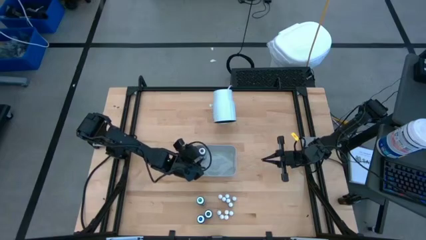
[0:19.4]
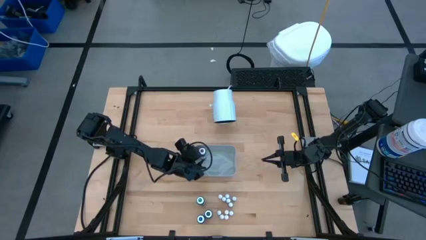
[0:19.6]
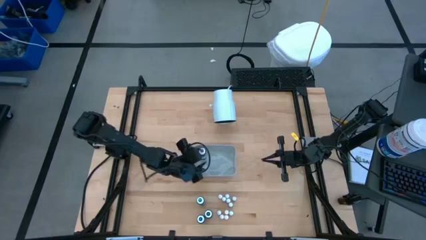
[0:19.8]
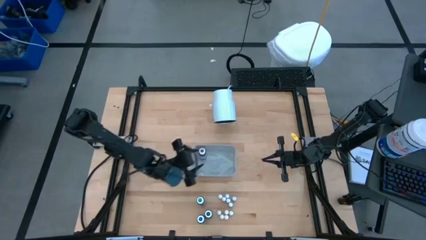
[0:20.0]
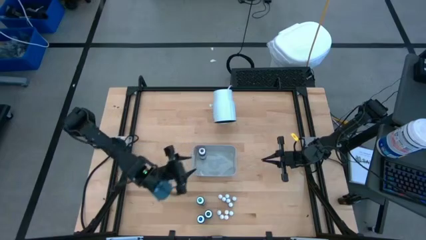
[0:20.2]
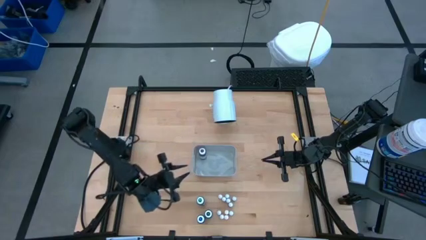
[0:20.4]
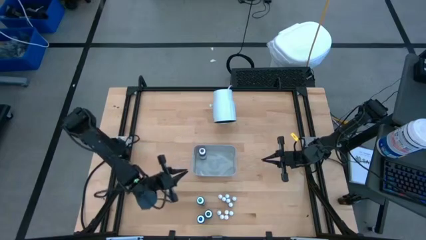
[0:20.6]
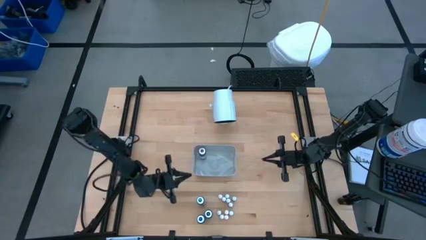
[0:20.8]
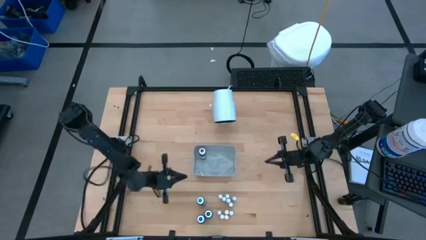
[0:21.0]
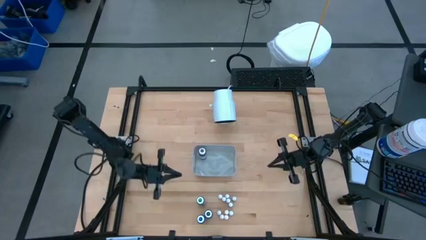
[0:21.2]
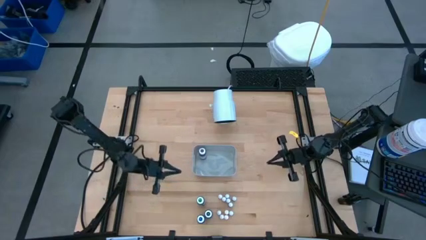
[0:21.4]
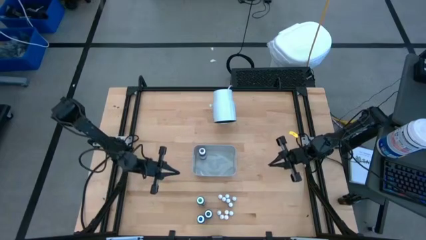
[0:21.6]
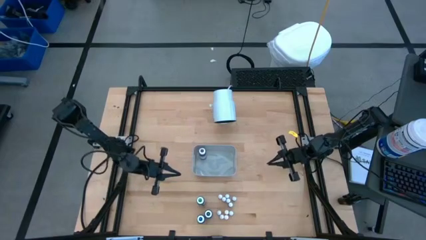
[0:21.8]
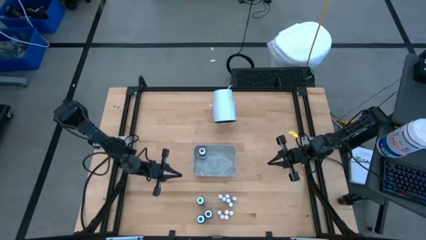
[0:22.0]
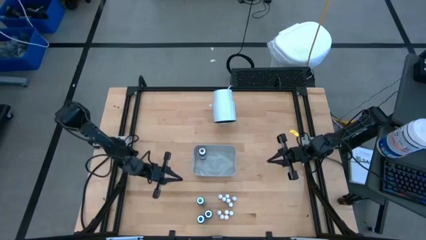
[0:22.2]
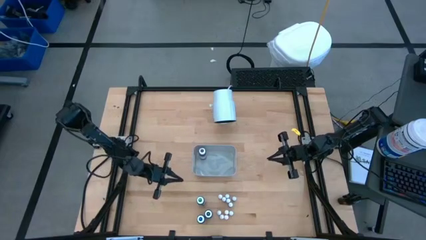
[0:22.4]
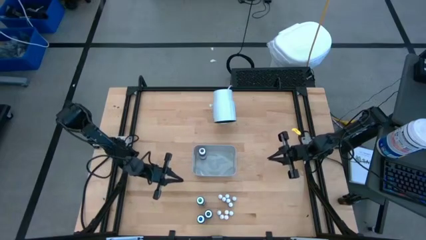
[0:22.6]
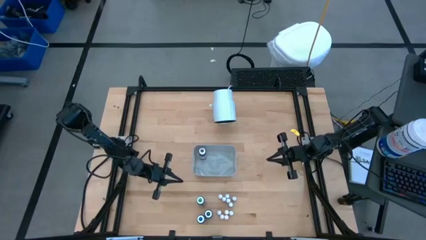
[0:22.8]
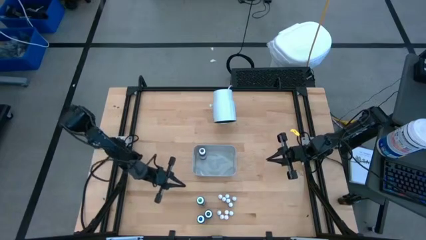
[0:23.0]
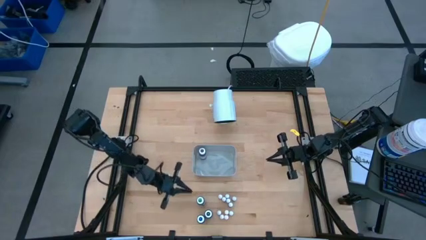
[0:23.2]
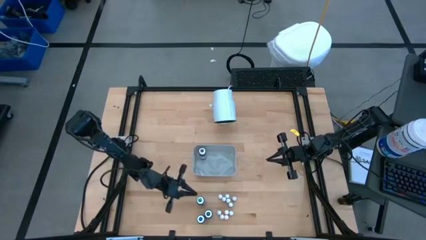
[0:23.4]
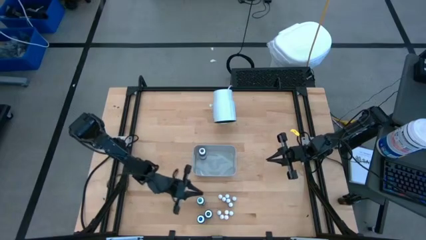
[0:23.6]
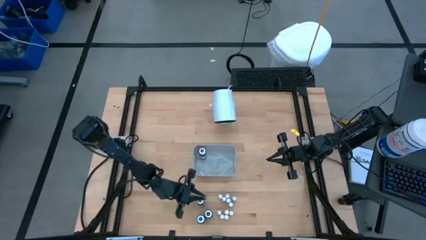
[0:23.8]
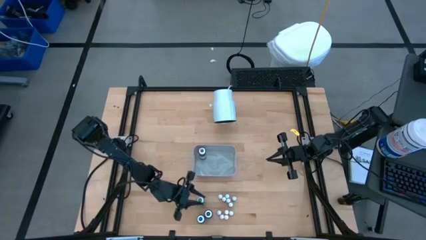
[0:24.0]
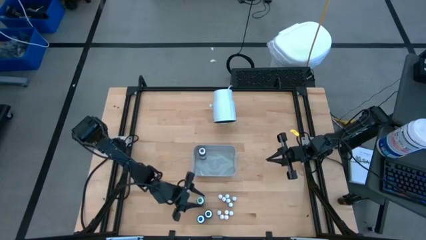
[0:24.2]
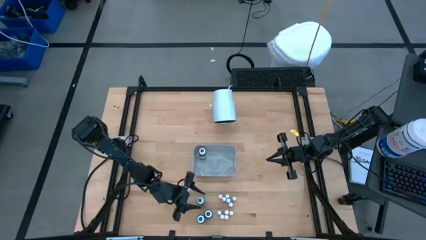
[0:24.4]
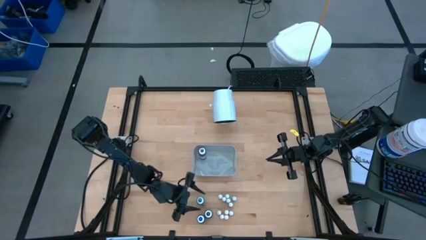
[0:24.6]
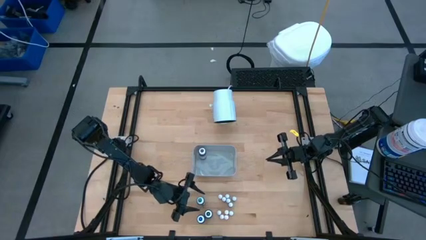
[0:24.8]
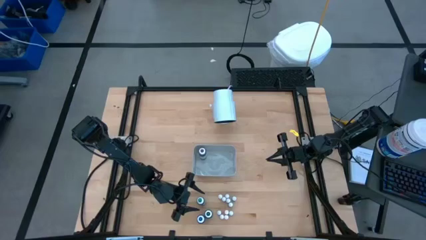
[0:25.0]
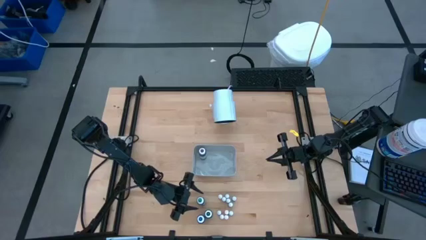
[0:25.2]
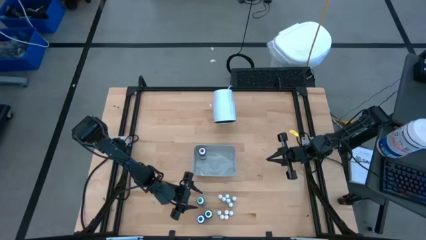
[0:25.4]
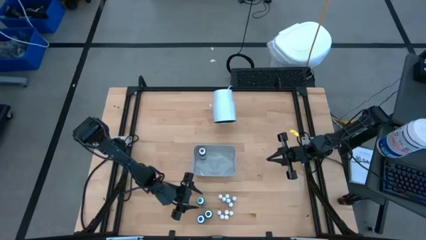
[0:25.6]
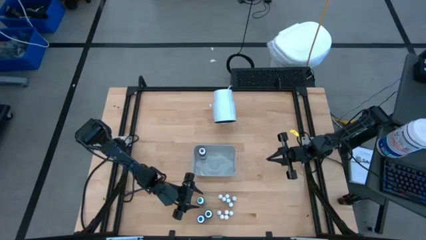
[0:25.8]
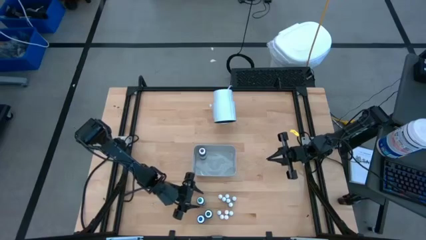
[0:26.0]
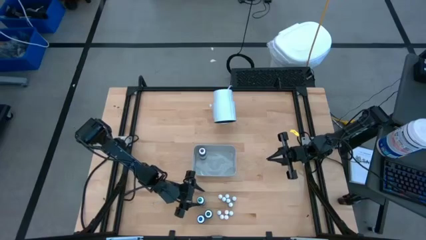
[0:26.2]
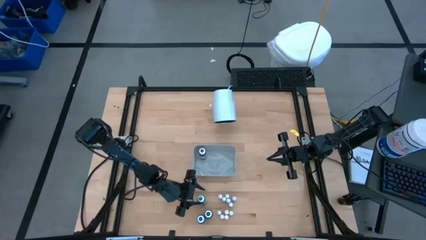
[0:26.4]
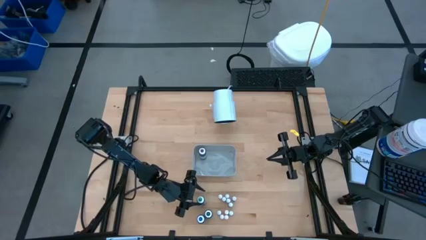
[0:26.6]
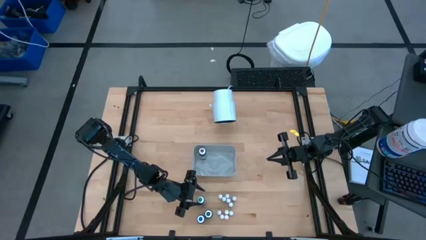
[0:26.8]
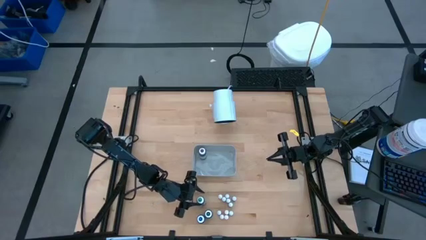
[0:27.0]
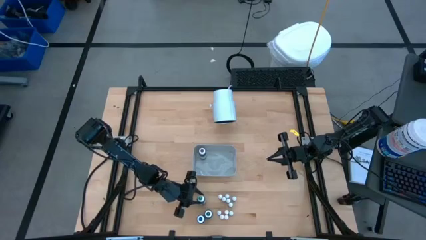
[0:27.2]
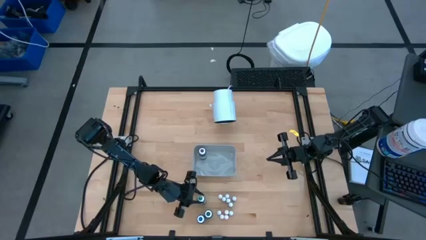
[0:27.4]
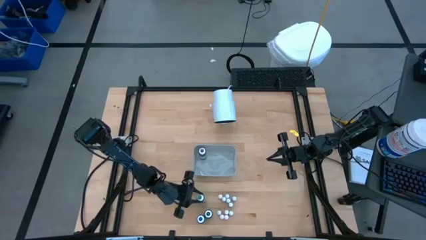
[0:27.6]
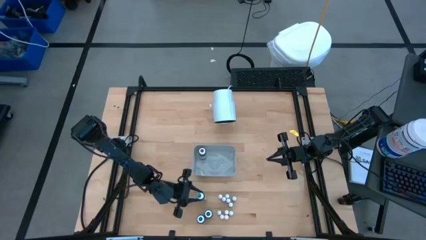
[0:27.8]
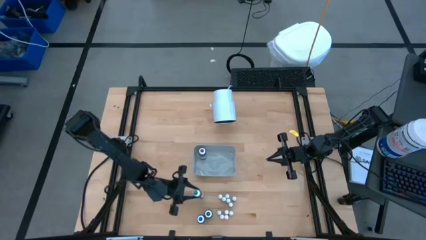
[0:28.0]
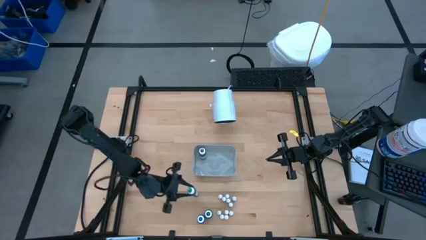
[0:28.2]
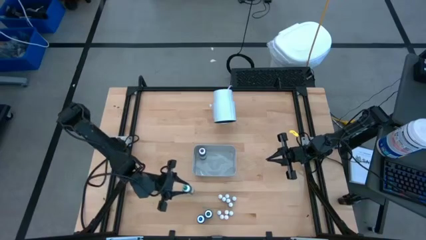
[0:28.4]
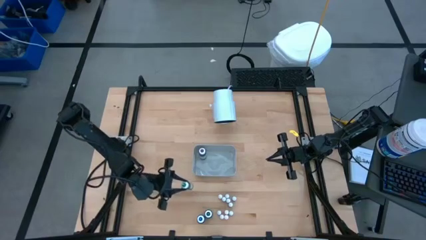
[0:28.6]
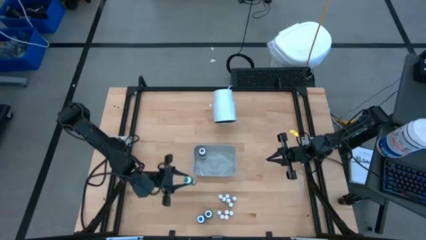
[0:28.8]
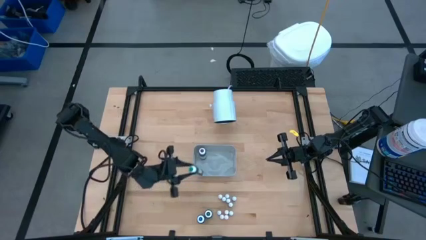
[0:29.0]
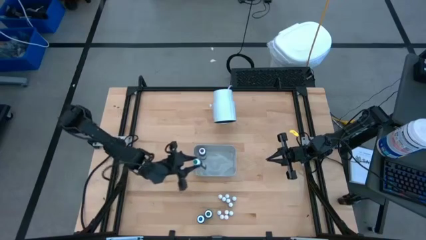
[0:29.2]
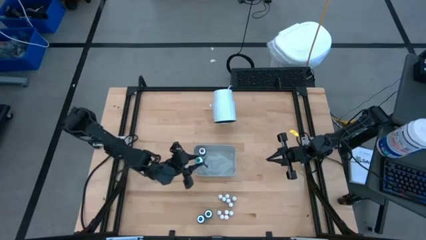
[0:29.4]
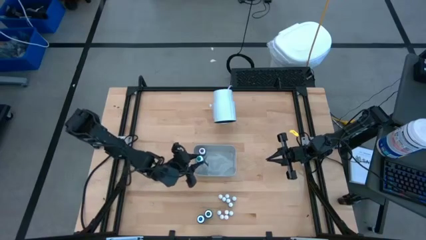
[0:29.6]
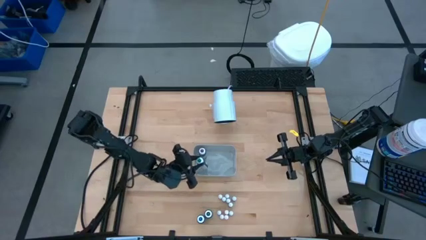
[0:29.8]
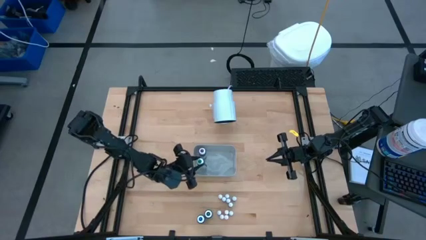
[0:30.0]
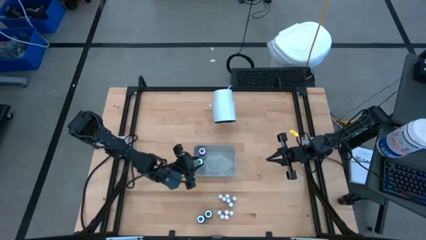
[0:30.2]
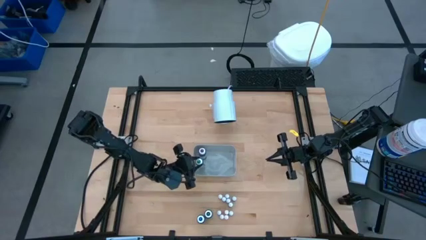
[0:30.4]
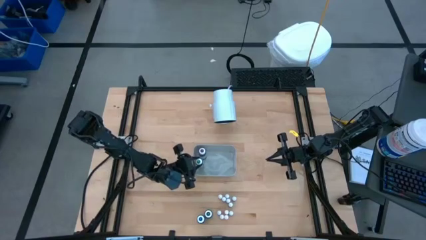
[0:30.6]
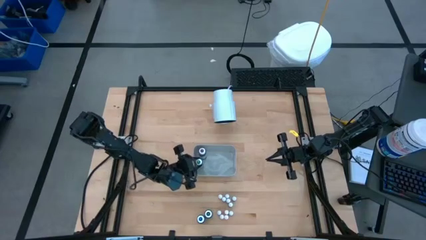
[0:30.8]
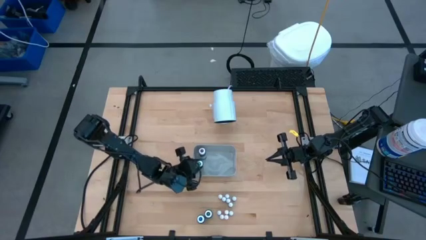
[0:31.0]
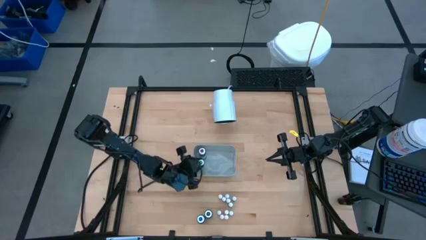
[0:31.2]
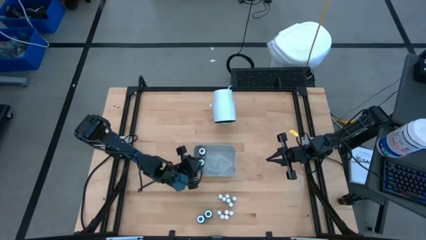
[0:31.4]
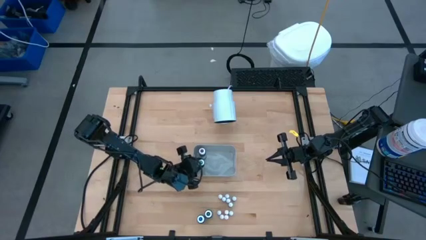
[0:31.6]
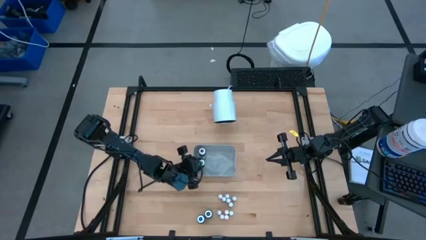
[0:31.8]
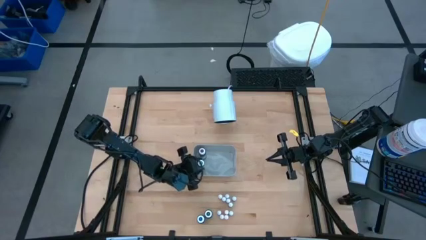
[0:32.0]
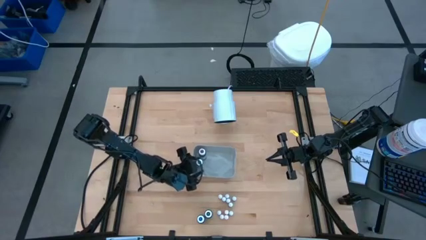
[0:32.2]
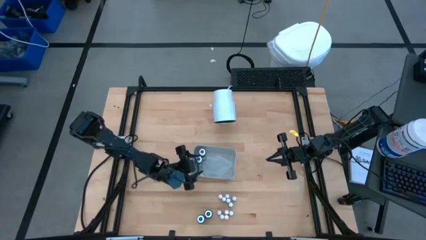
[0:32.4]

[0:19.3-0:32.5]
Task: Pick & Place food coloring
Put the large green food coloring bottle into the gray bin

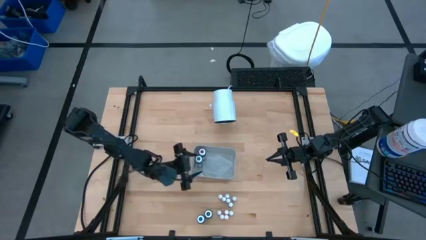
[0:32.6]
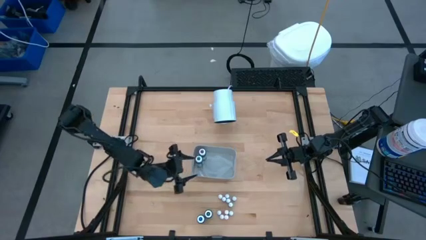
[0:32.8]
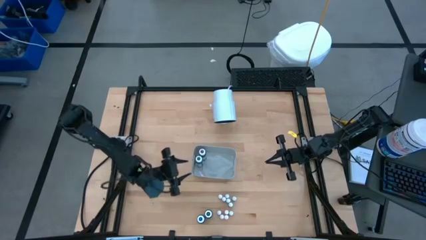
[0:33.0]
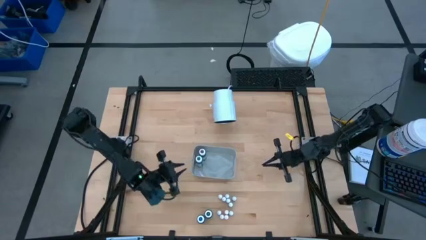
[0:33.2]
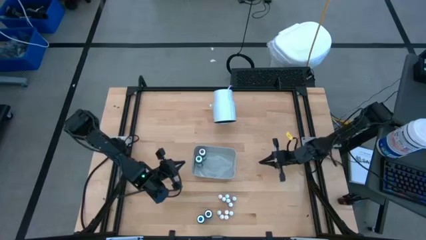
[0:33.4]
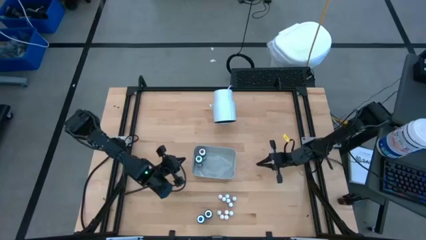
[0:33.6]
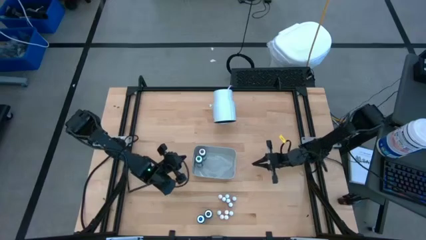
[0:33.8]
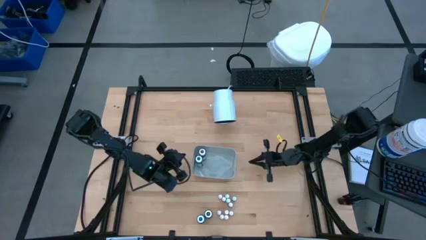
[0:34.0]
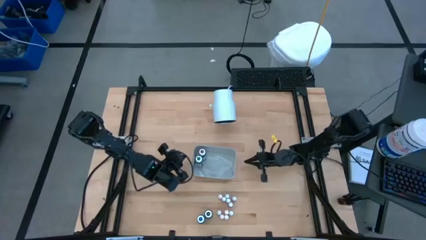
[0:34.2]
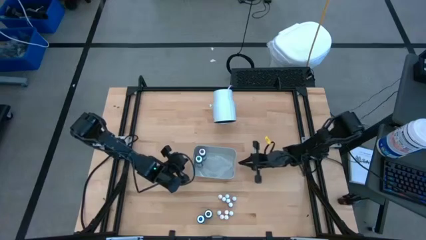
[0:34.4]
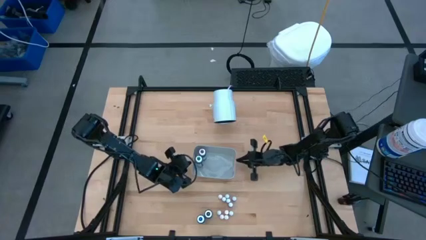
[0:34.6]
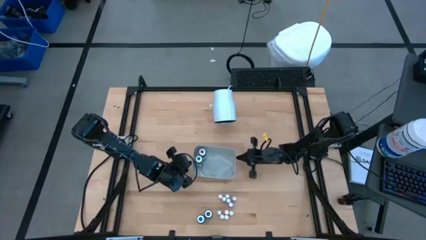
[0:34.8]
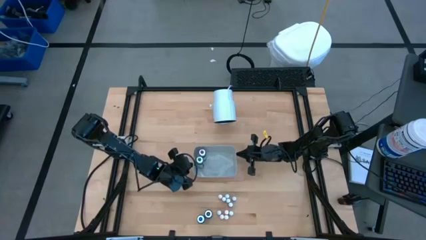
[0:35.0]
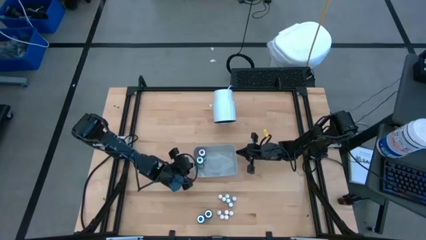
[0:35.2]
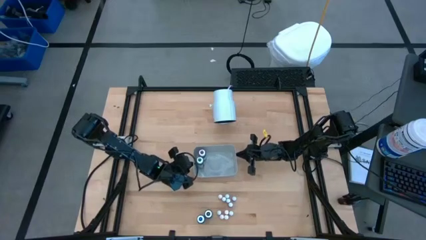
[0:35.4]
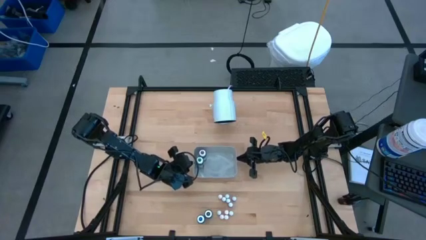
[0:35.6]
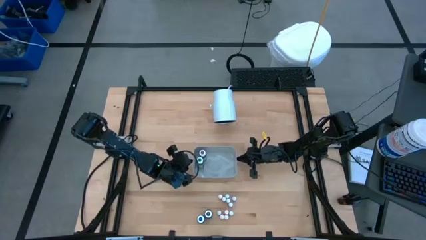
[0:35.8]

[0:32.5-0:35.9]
Adjust the gray bin
